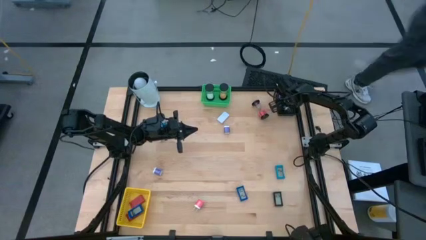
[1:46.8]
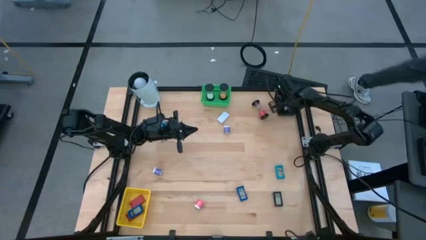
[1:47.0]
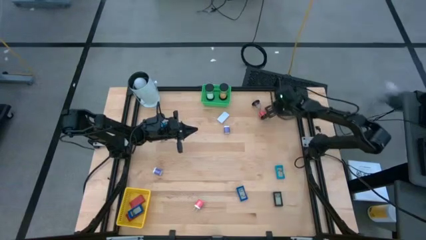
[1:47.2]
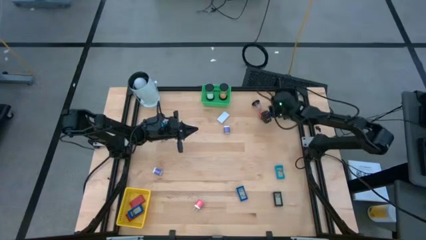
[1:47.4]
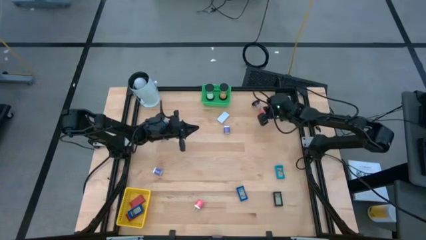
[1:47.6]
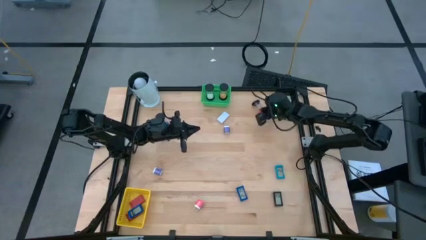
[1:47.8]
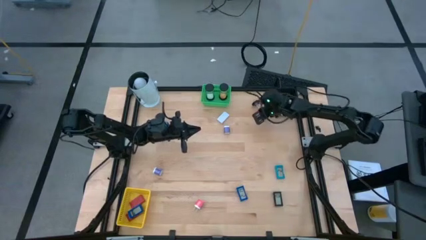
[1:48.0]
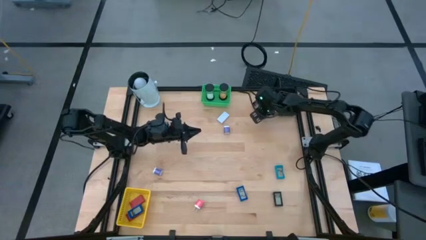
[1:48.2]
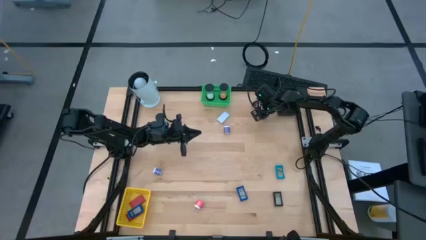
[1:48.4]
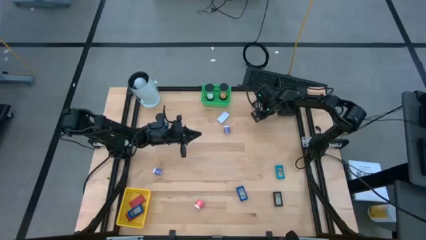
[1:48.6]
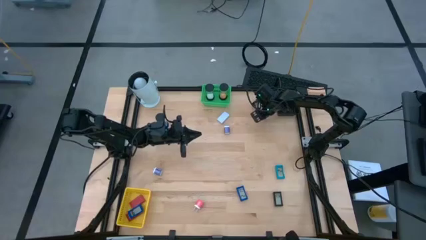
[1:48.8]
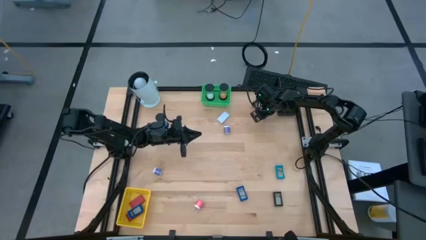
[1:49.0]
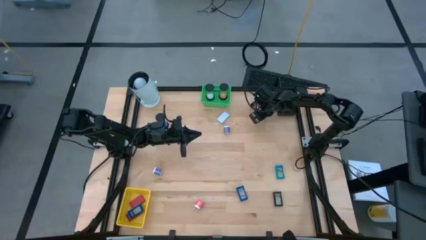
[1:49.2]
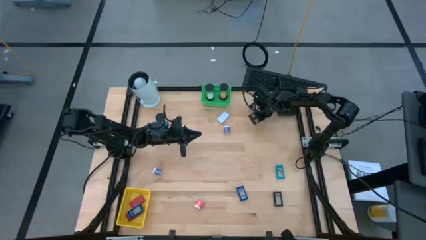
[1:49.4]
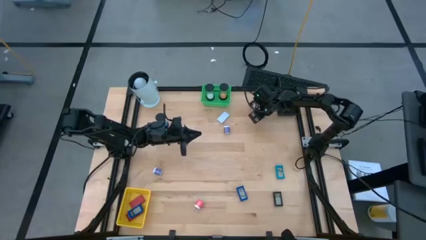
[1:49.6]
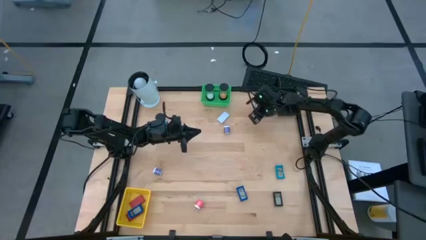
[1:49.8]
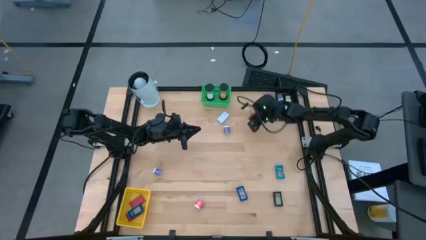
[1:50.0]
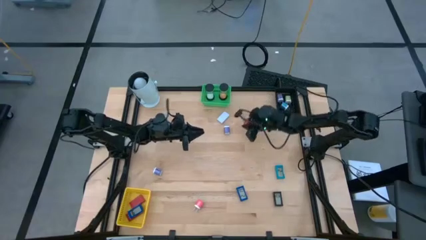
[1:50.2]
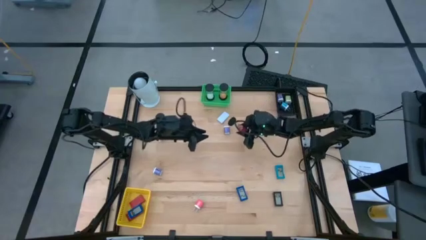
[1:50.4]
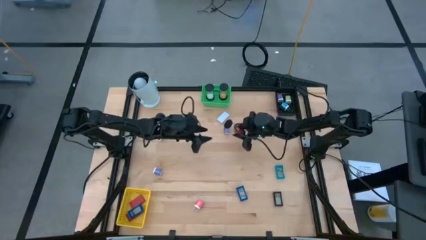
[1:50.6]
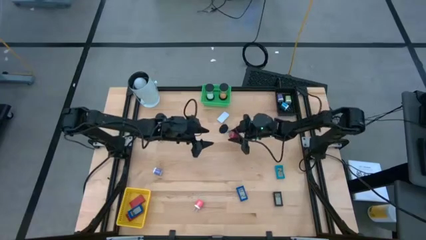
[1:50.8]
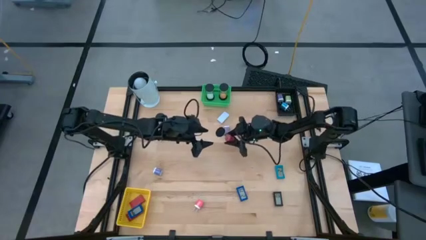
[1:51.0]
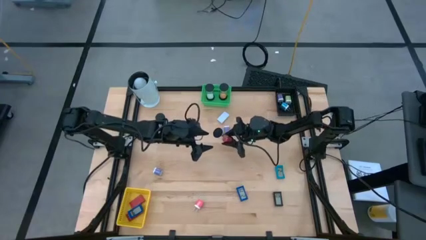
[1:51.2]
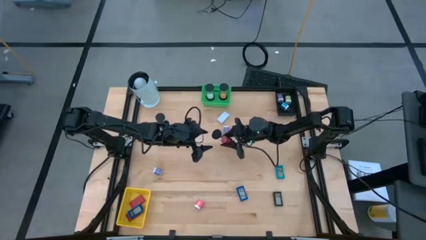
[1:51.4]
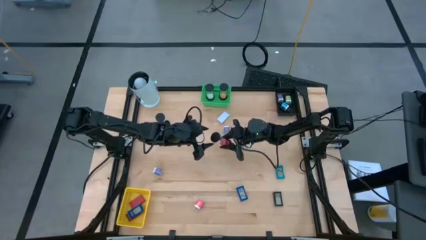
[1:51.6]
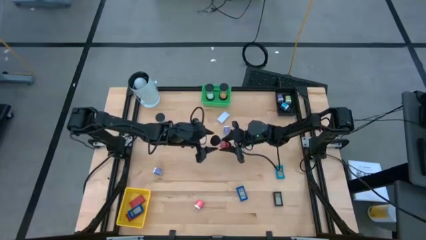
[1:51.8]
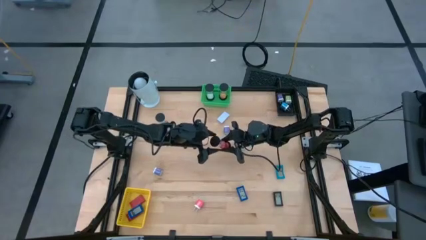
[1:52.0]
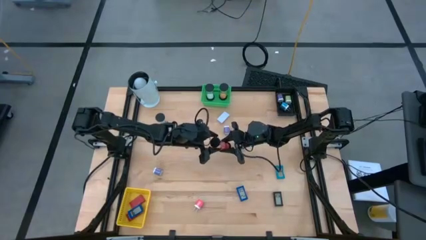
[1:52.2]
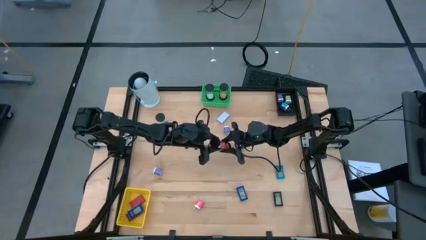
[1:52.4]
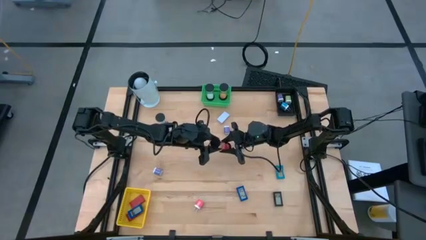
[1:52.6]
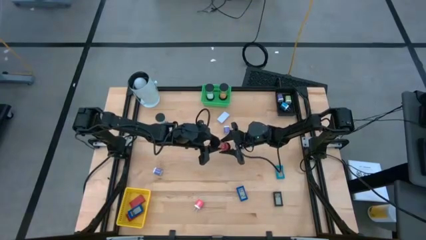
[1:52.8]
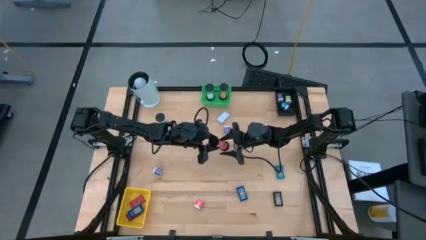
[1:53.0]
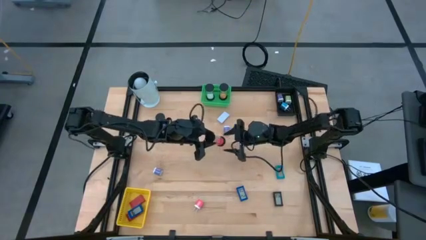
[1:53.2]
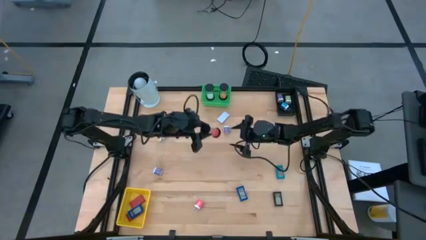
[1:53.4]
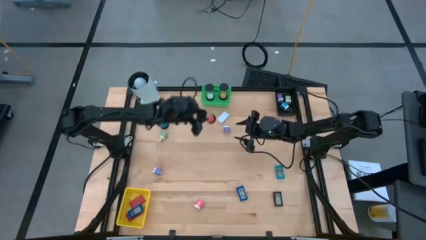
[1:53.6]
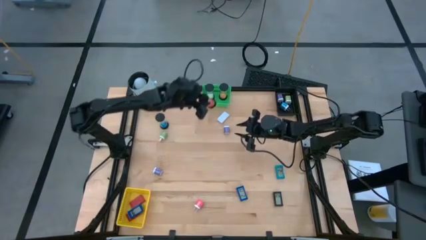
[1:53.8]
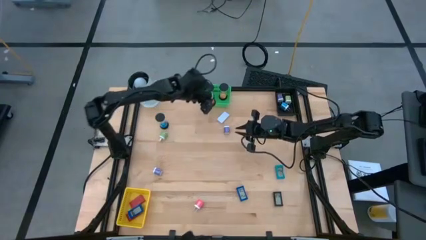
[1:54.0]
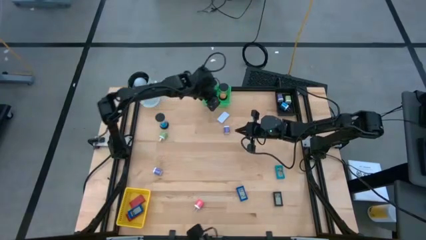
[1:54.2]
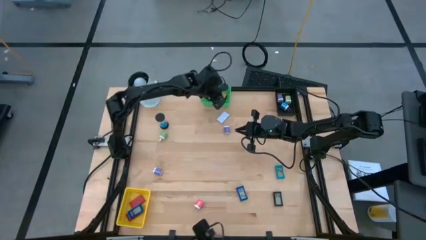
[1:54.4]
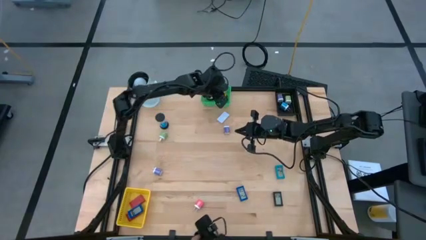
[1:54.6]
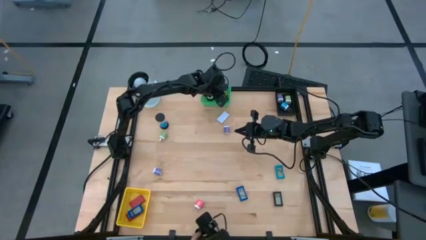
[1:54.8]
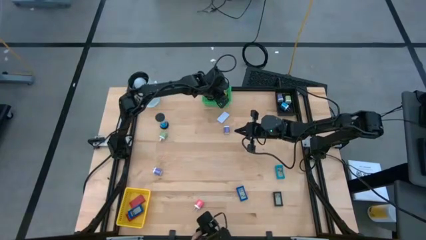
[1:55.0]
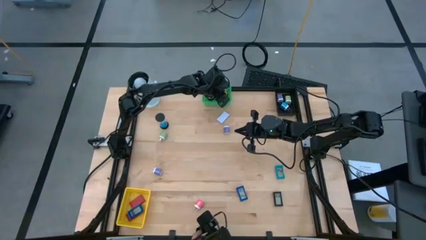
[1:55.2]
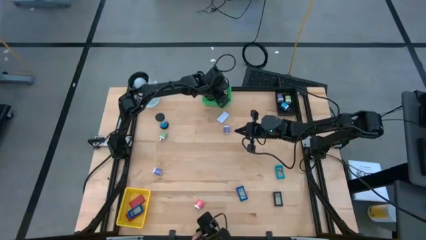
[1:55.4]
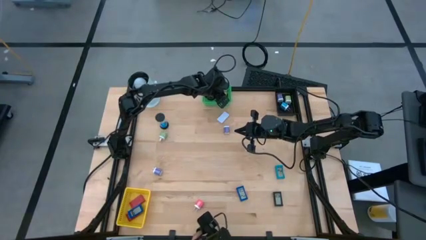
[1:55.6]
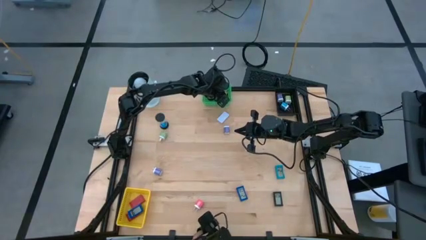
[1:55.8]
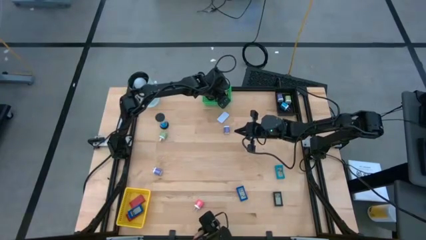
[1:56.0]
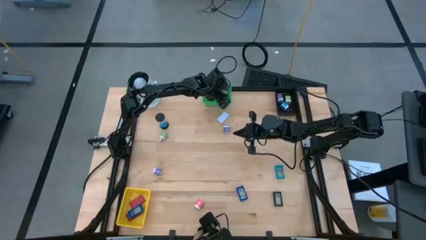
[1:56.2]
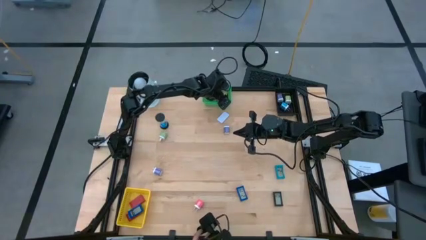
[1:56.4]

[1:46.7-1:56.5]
Task: Pick & Place Office items
Put the red hourglass into the green basket

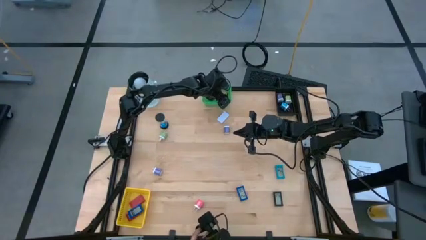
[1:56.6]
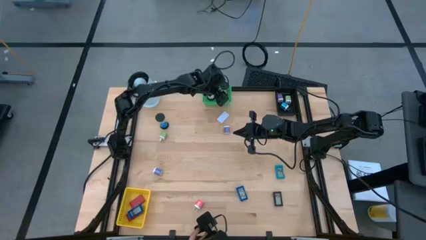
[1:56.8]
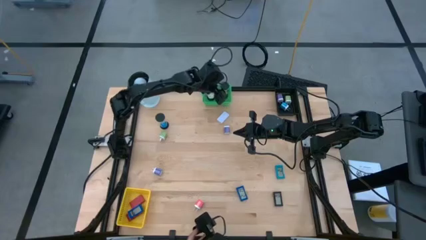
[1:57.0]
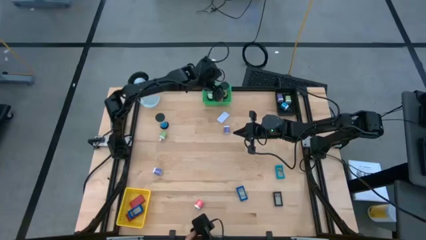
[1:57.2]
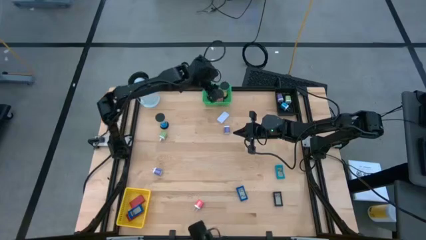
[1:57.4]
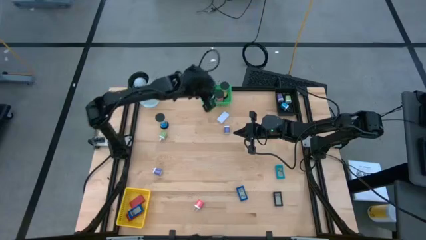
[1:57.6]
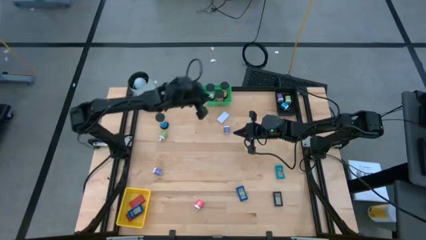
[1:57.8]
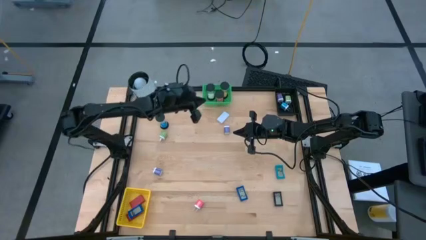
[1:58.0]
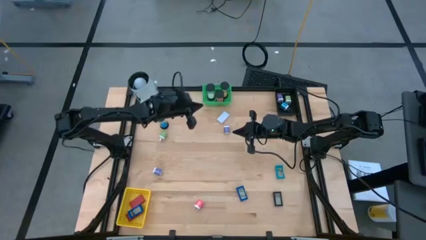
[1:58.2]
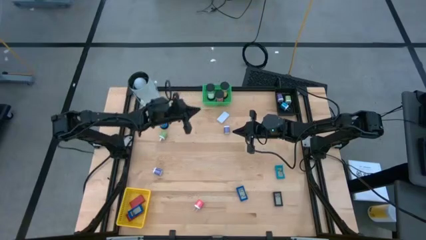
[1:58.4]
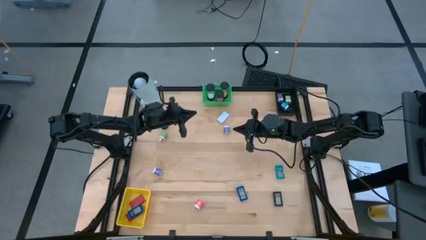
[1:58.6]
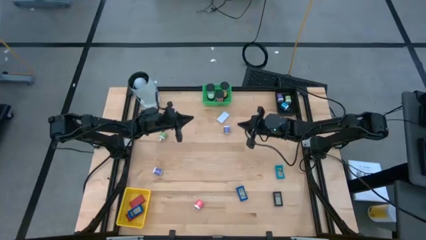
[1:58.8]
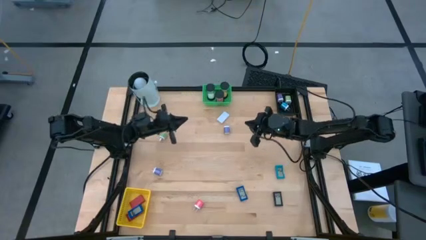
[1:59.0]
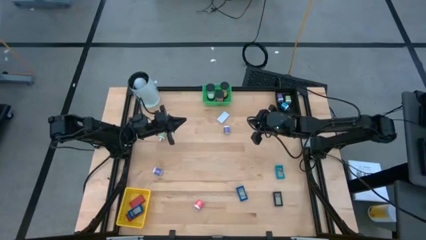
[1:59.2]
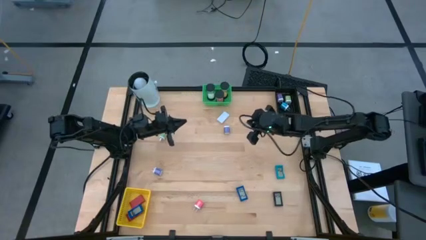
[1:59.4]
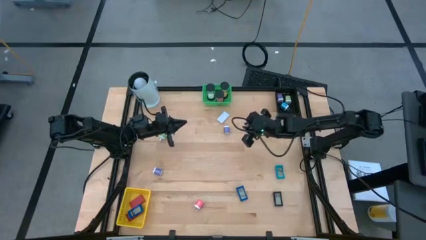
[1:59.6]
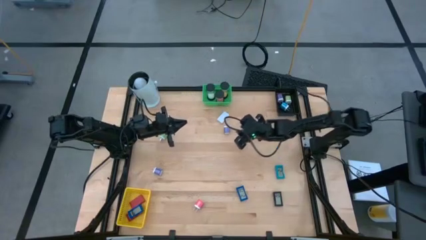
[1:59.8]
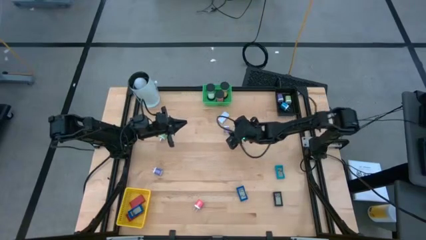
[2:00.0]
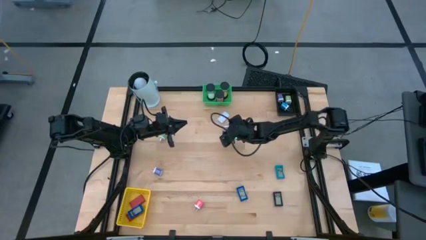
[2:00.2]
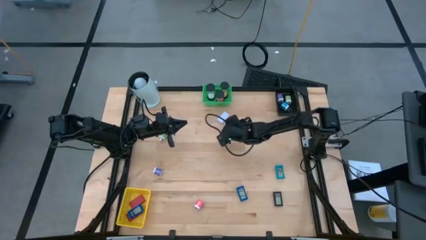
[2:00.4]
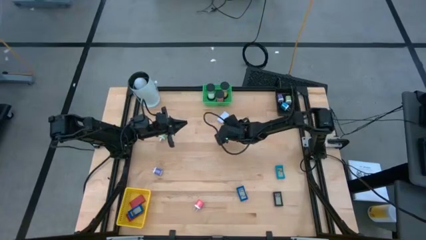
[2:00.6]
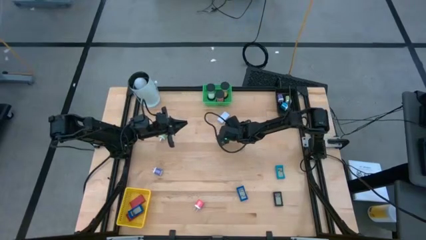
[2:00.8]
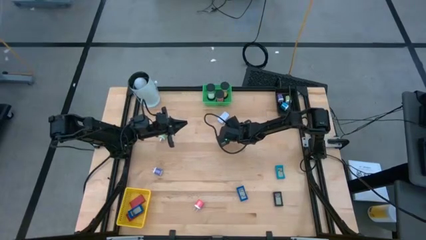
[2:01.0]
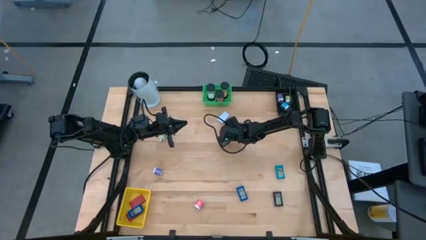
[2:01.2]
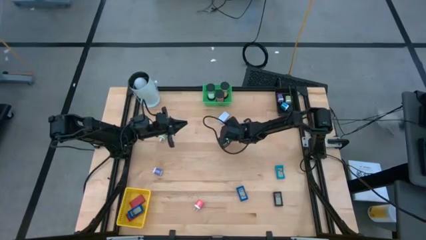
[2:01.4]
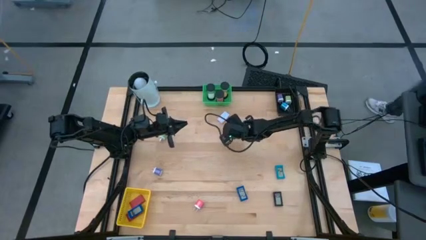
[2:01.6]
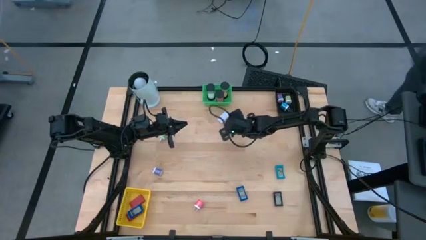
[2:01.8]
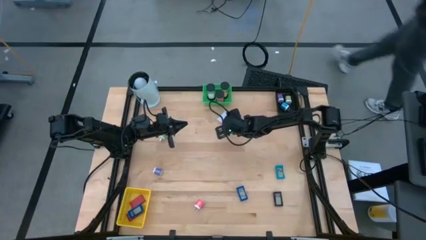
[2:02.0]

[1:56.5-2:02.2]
Put the right purple adapter into the black basket

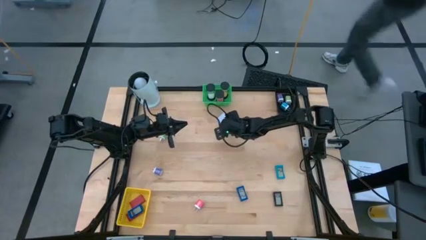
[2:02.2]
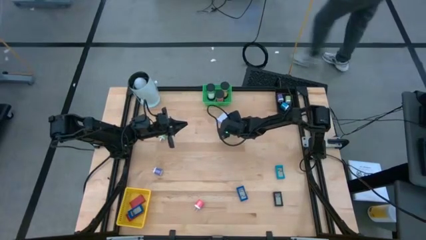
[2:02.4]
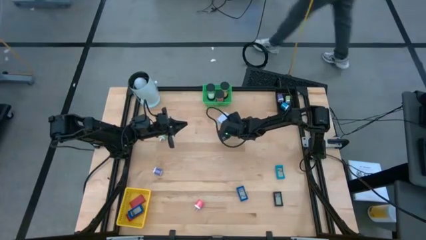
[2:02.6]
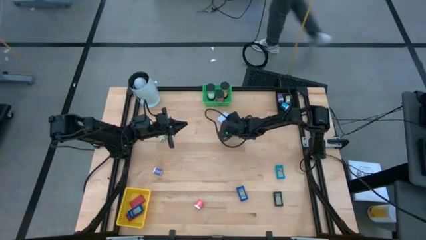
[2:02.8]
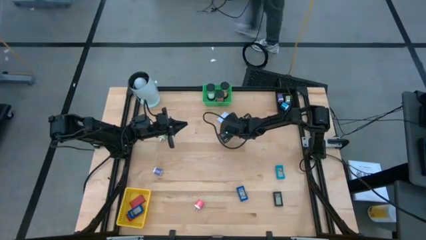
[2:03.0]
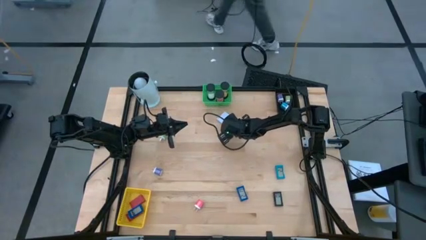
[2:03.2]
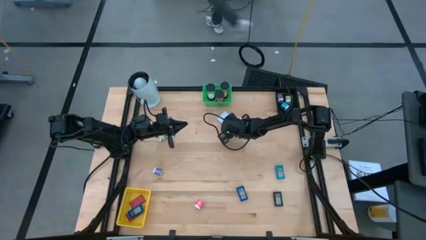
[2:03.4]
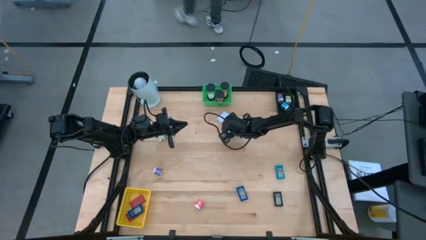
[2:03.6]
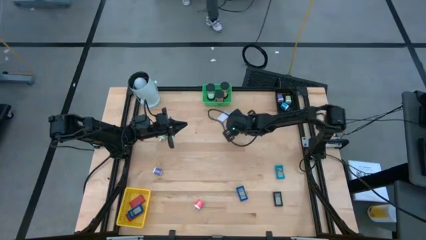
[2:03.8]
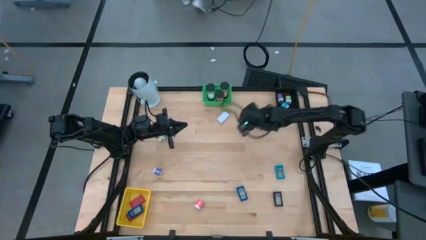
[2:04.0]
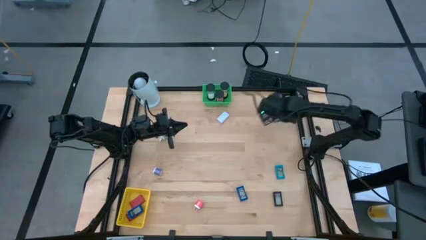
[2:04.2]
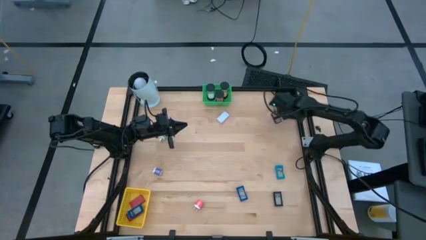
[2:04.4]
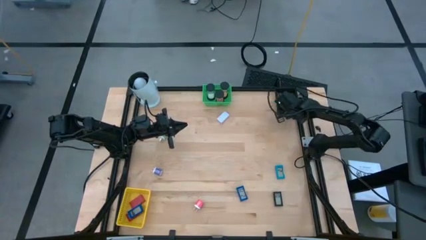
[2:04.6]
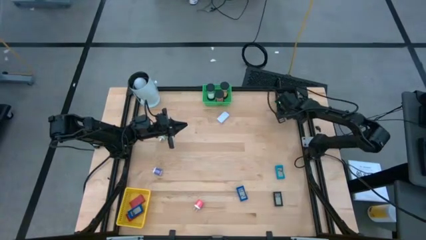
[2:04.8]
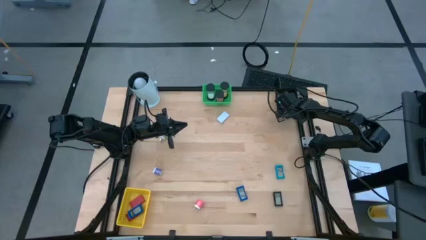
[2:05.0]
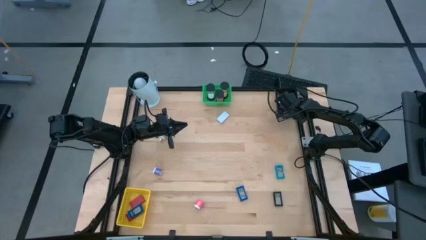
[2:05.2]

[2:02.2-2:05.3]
Put the right purple adapter into the black basket
